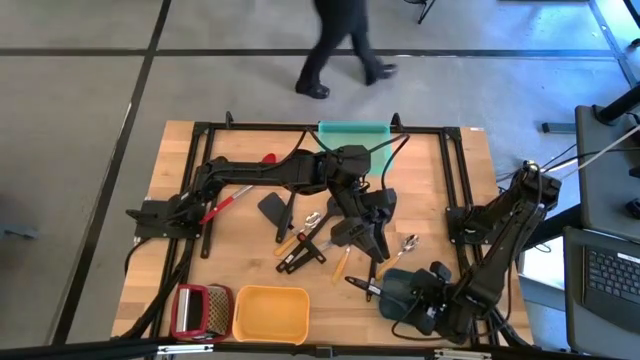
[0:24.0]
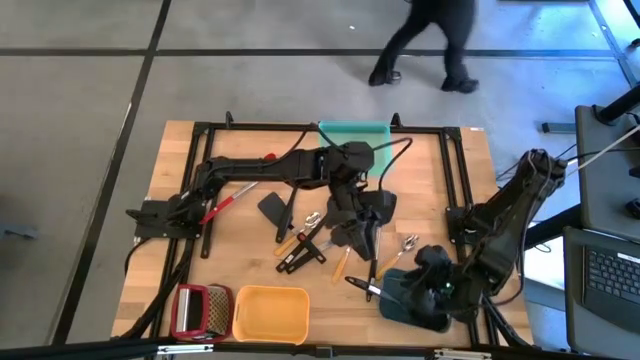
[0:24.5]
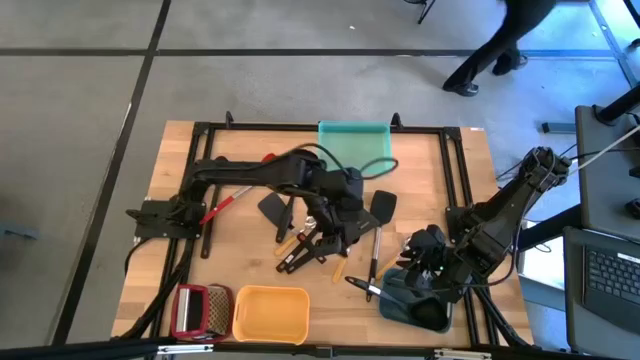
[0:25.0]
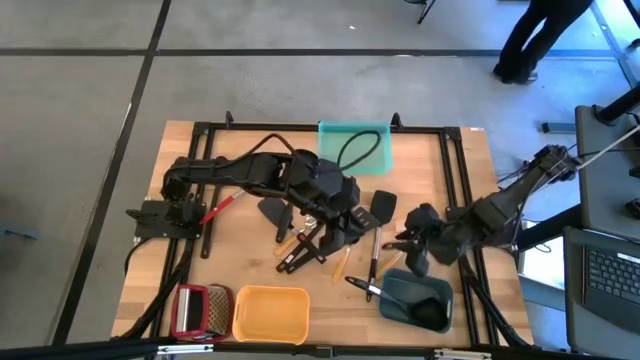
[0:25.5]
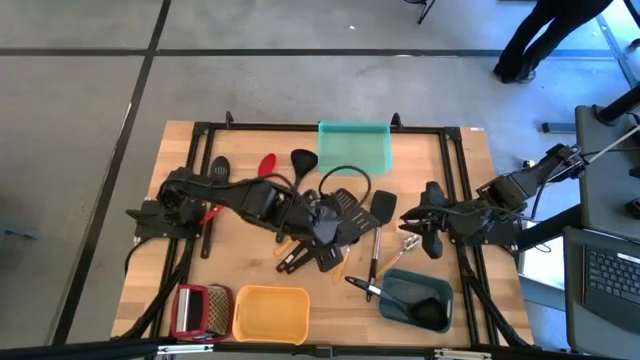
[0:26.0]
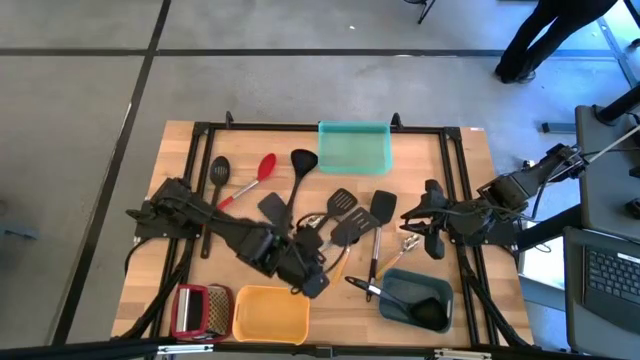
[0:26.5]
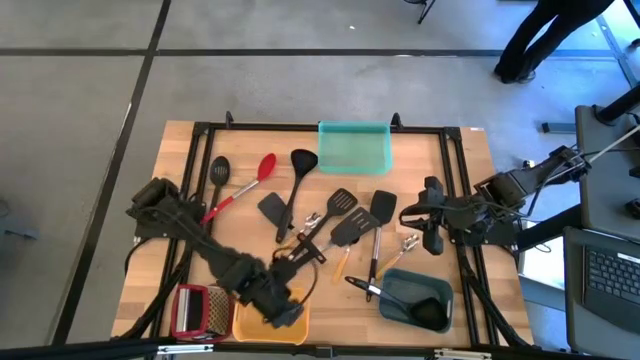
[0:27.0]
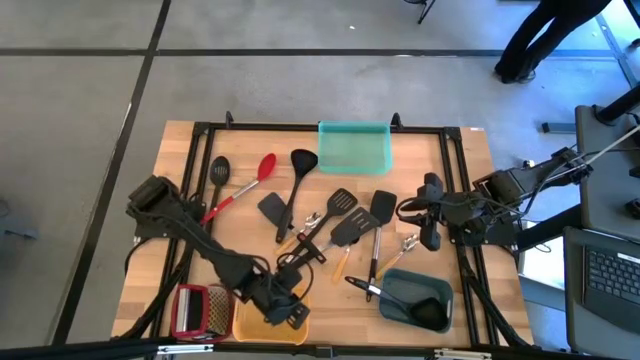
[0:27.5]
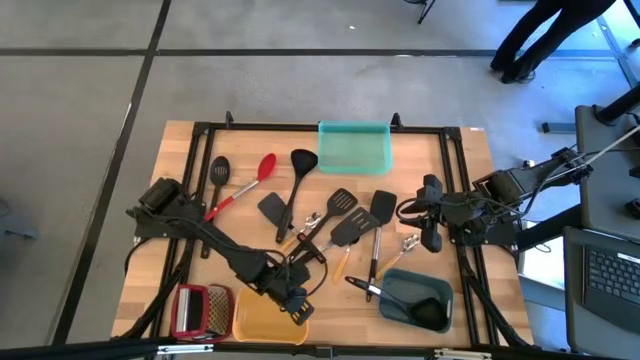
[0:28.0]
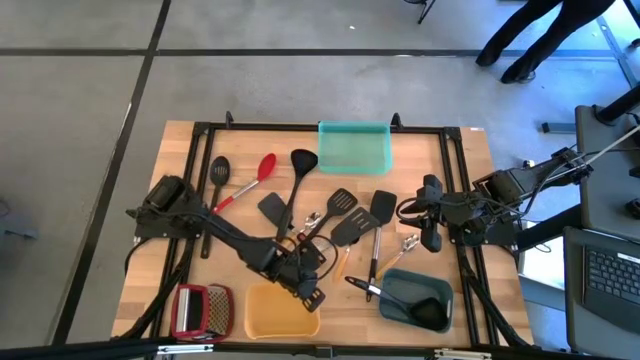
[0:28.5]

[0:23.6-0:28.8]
Task: Pick & Place Kitchen Items
Adjust the yellow bin

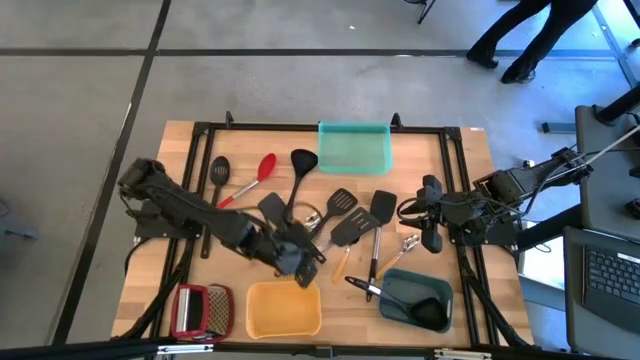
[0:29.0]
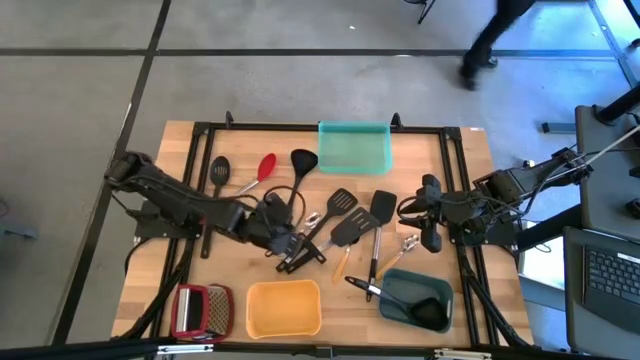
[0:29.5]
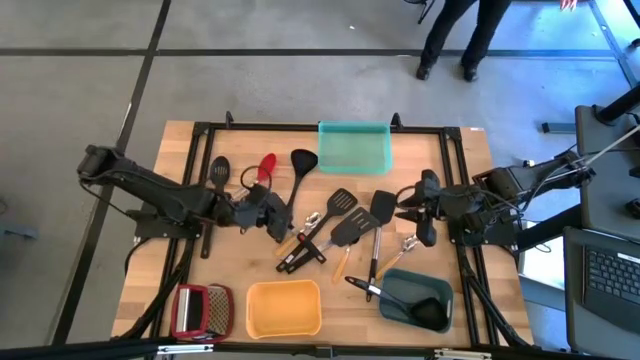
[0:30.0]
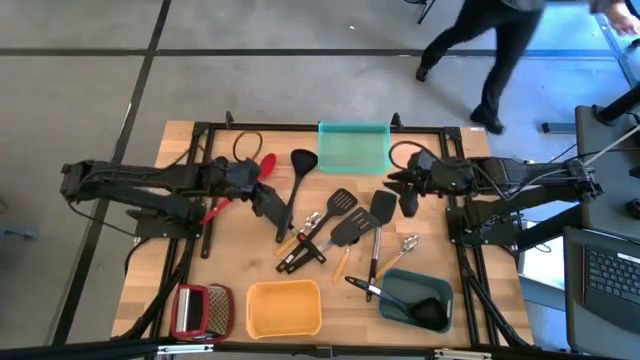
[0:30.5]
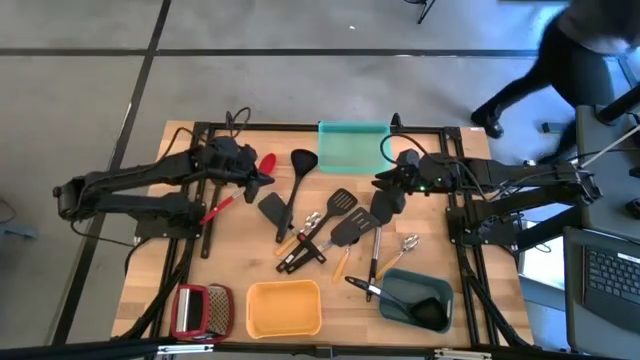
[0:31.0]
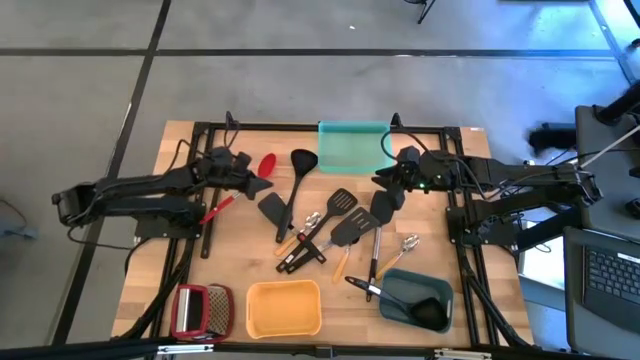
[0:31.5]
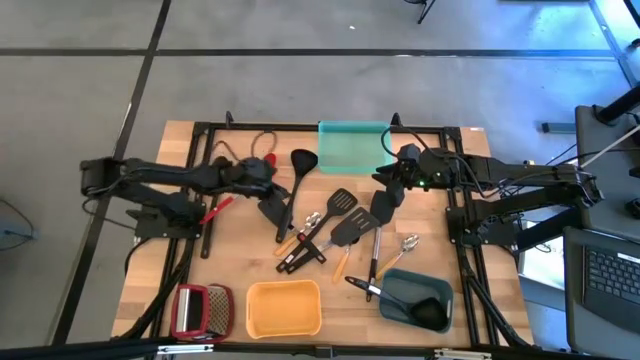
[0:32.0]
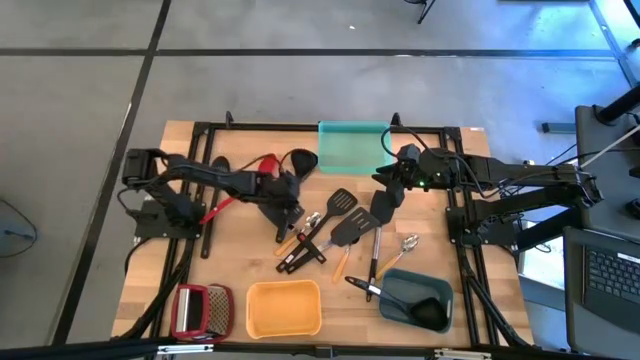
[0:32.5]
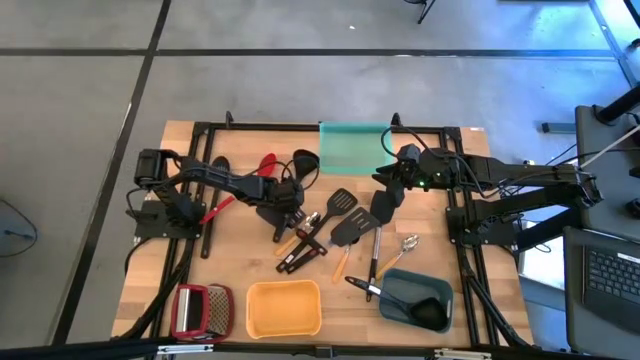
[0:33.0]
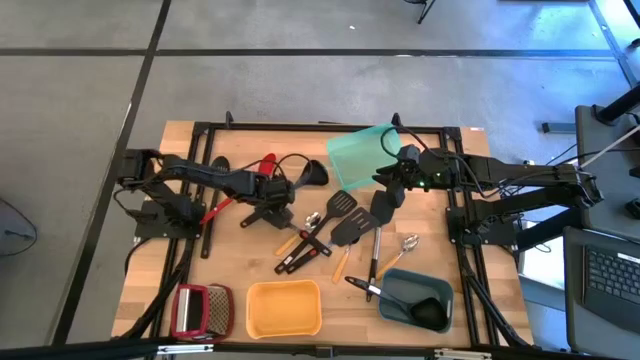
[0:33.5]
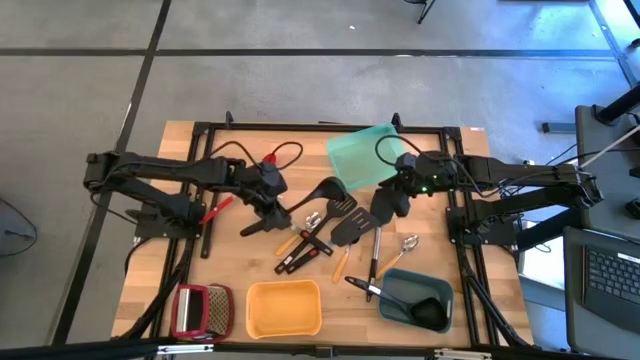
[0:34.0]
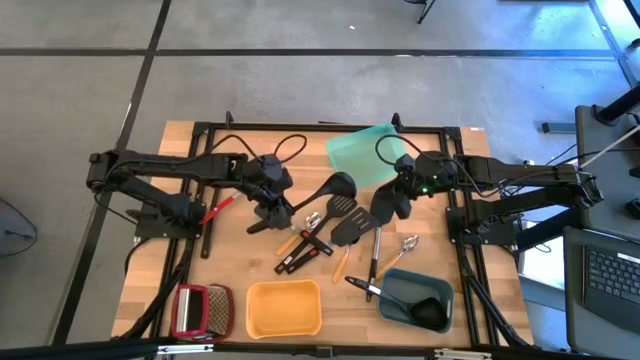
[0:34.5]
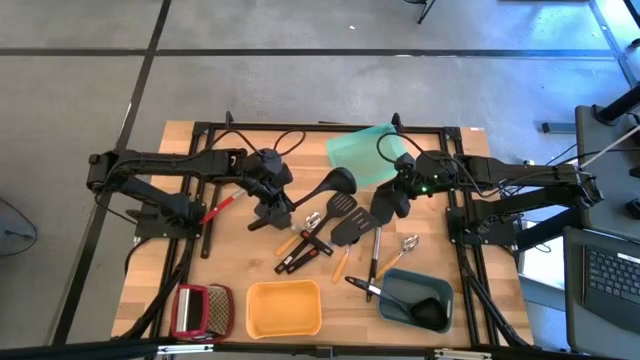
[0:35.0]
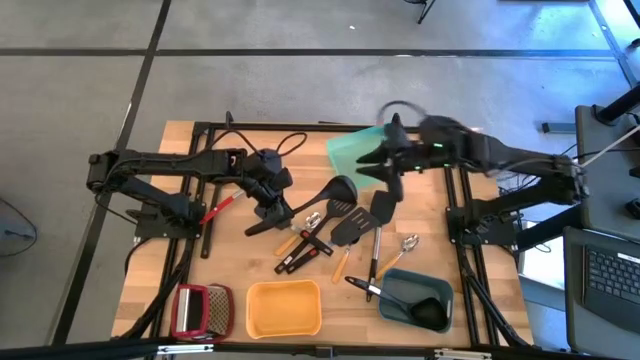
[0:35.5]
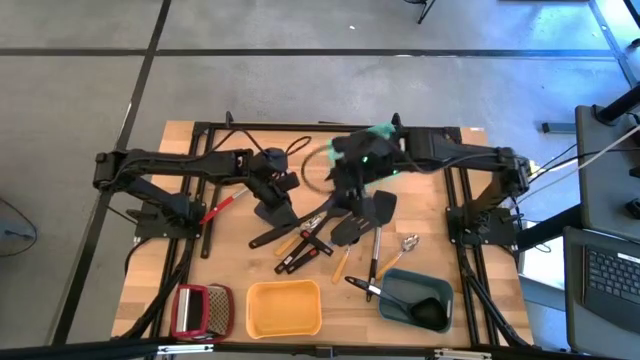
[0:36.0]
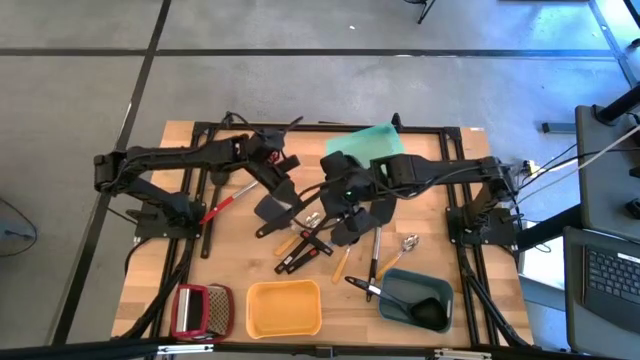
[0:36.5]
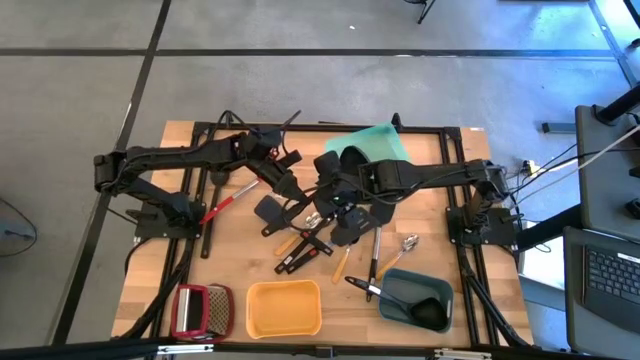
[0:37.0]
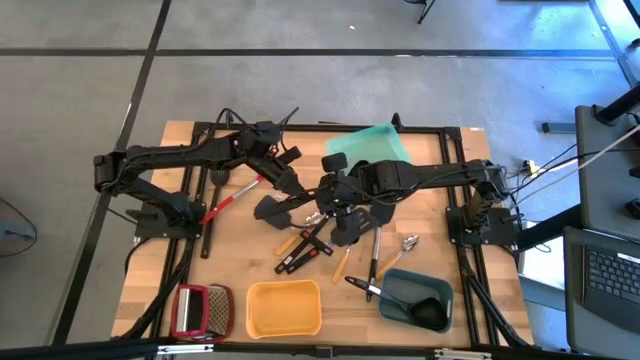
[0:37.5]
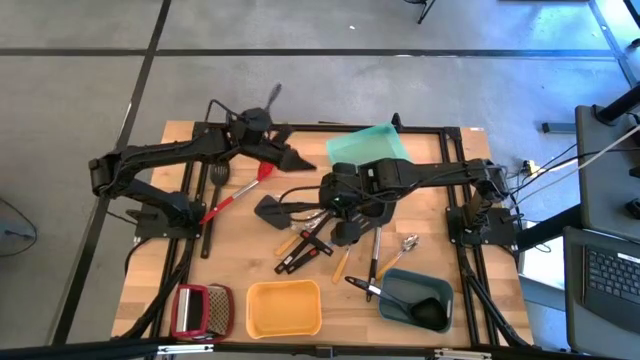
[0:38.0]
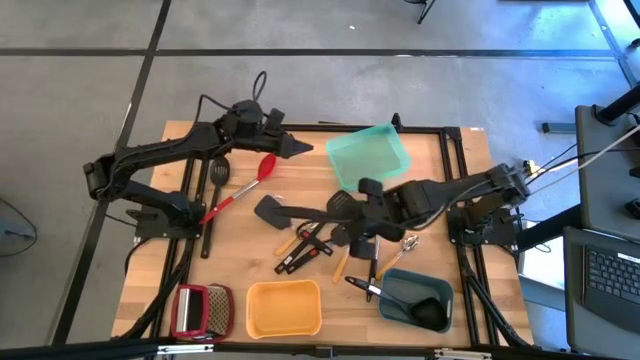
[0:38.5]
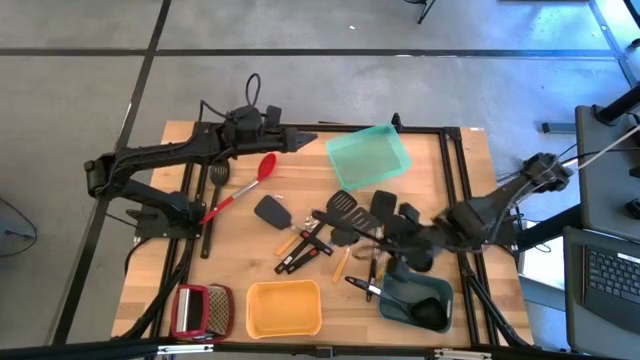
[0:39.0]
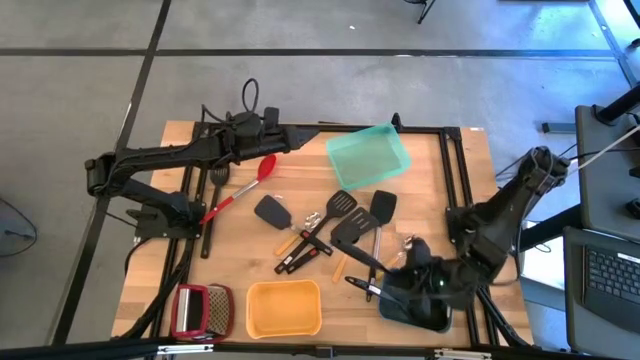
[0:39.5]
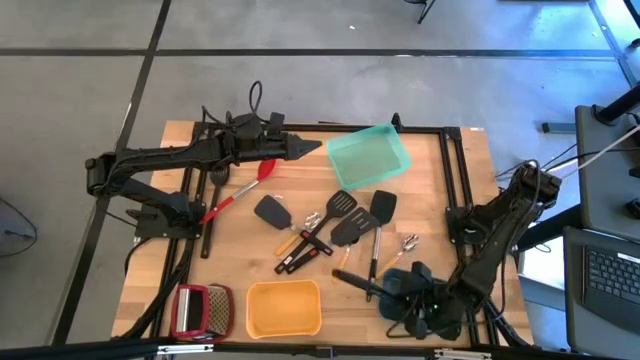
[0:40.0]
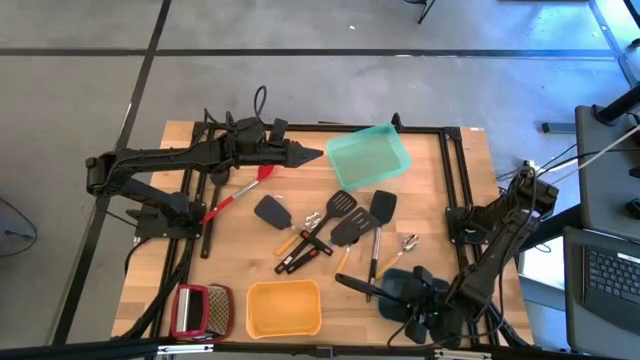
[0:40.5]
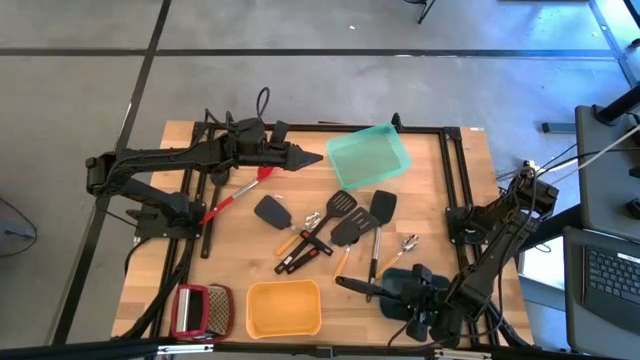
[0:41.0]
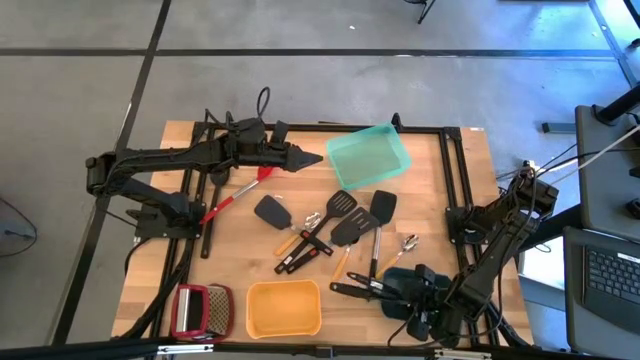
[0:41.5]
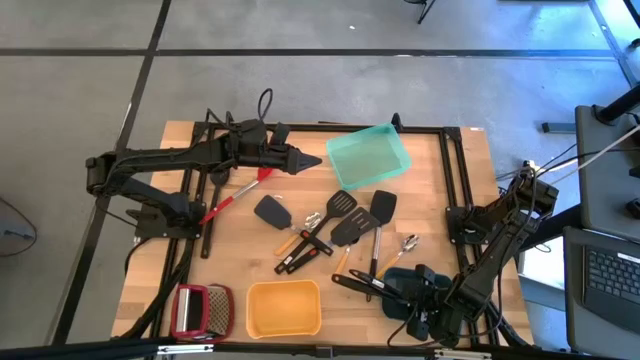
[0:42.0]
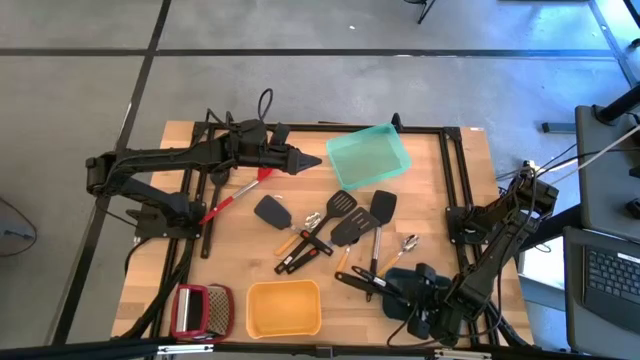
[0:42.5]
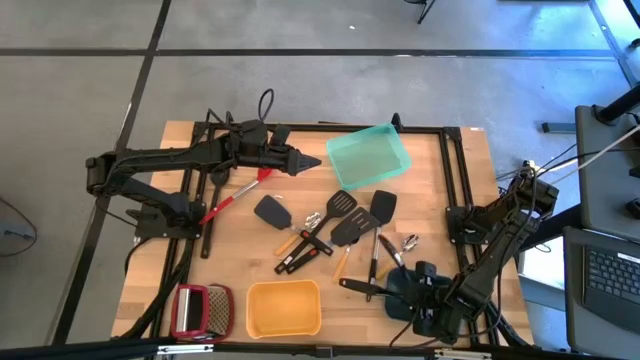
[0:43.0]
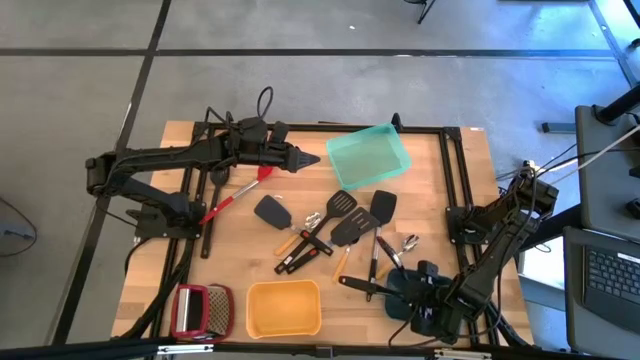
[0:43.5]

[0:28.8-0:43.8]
Put the black serving spoon into the blue bin

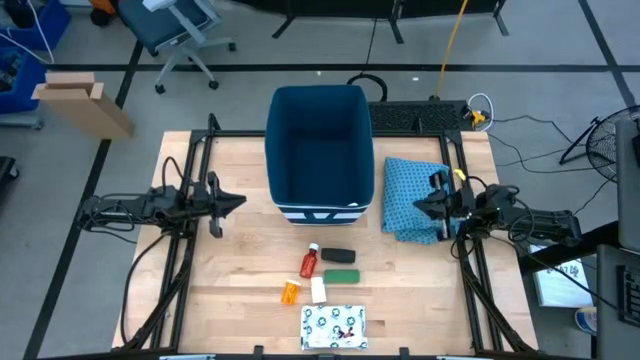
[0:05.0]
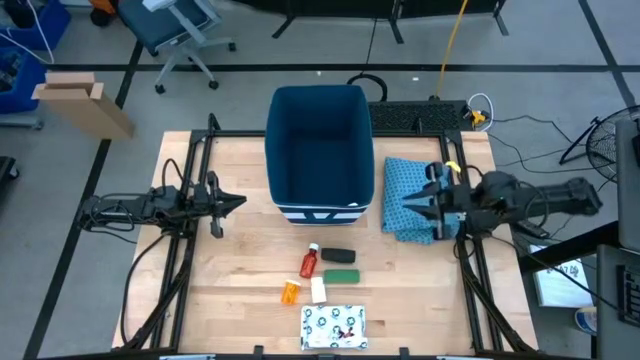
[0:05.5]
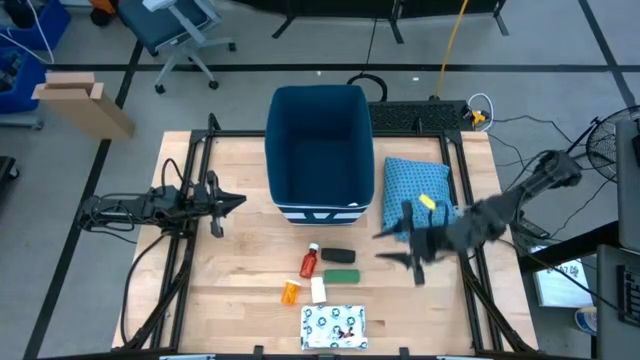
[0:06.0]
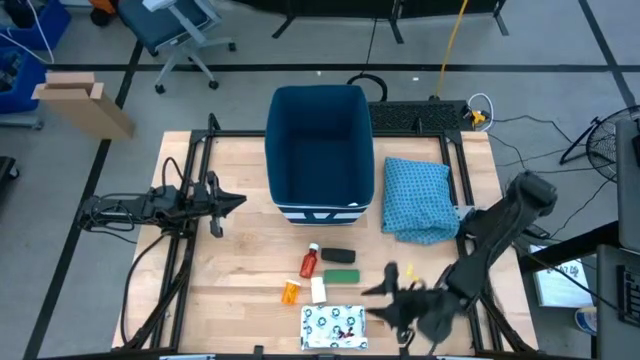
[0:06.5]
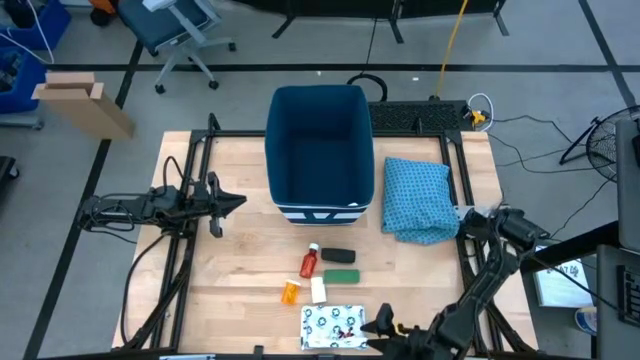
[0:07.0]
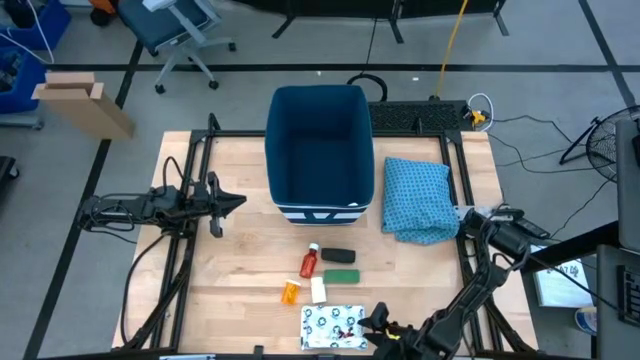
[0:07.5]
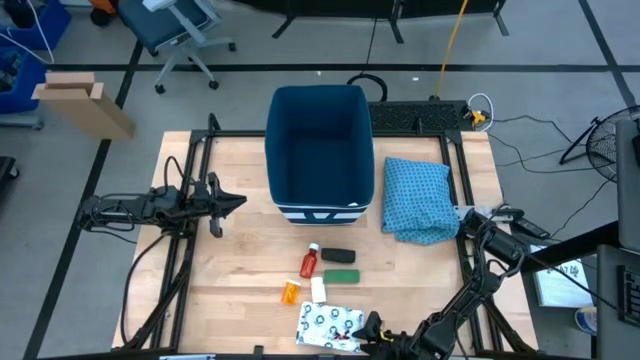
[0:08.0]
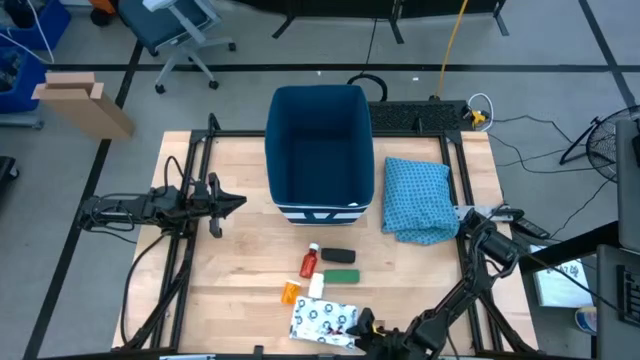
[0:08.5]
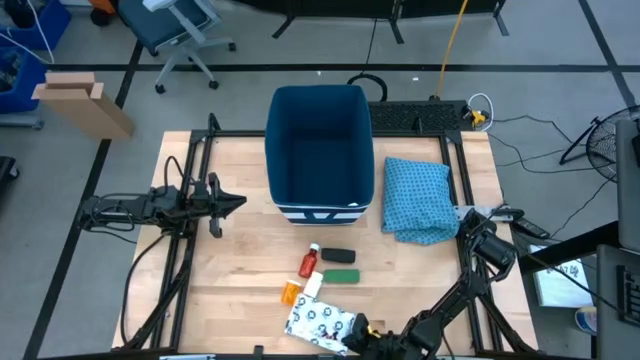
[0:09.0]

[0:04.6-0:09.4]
Task: Pick & place medical supplies in basket/bin
Put the mailer bag into the blue bin
